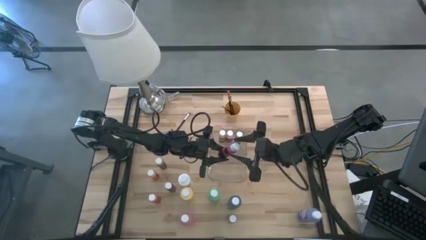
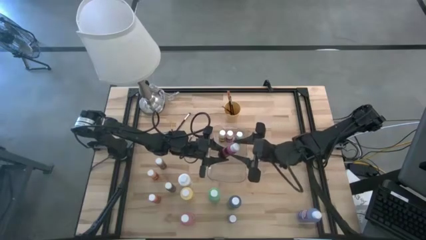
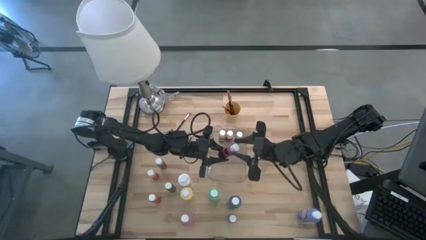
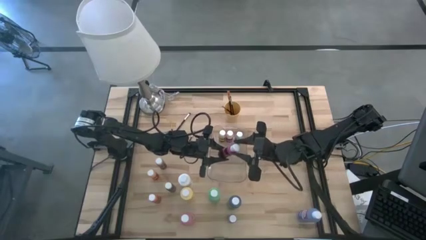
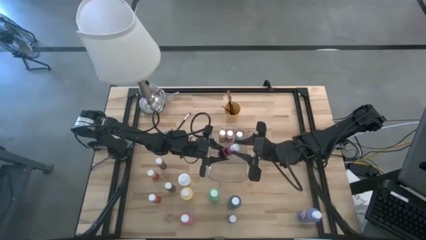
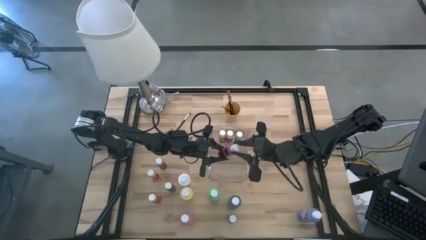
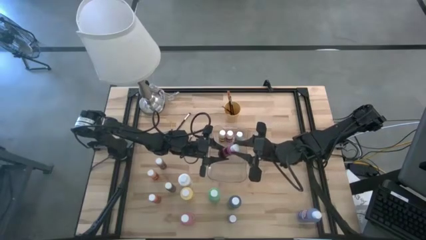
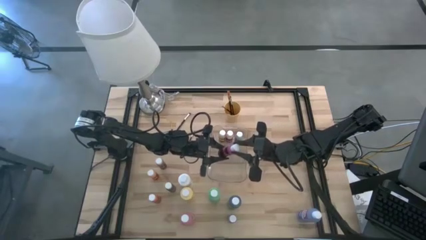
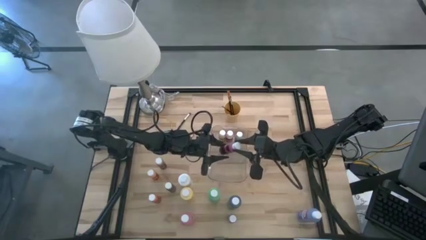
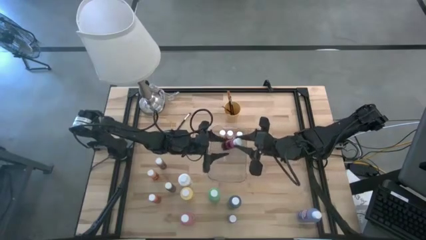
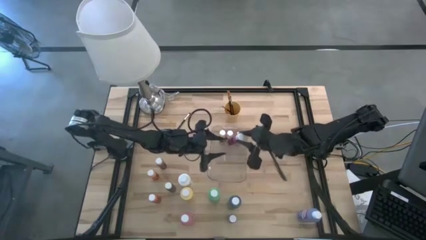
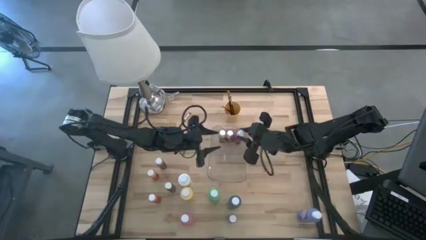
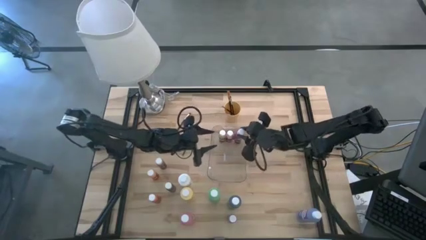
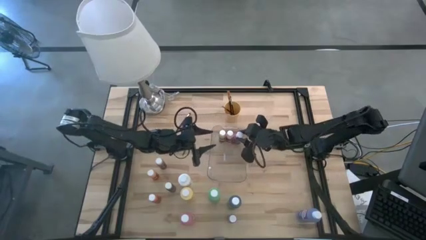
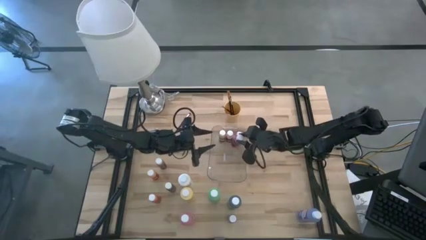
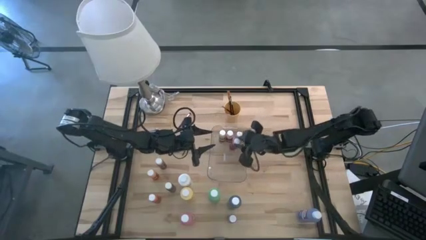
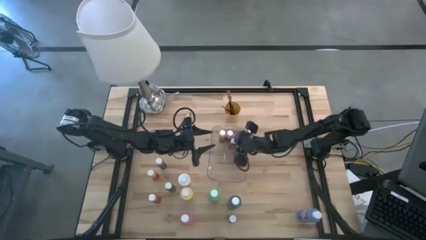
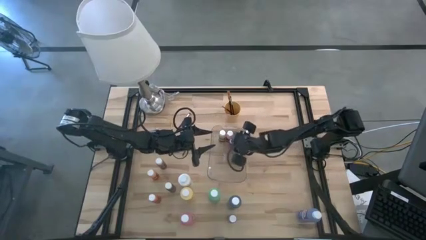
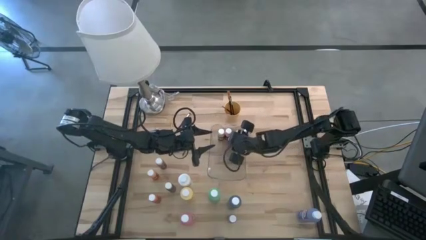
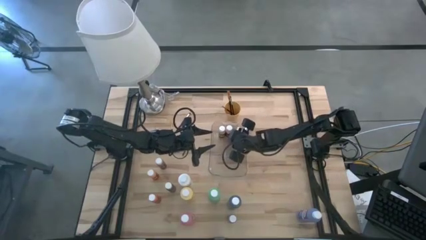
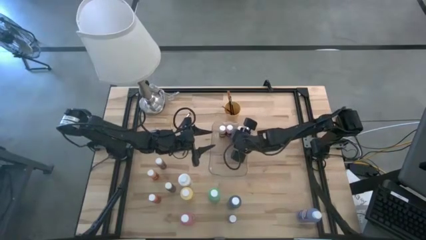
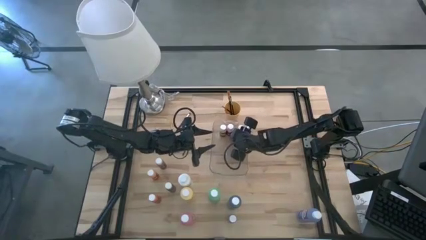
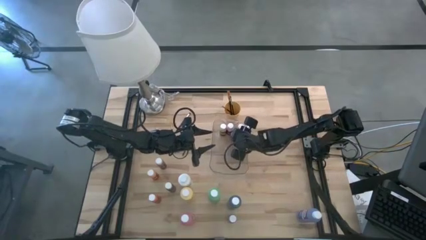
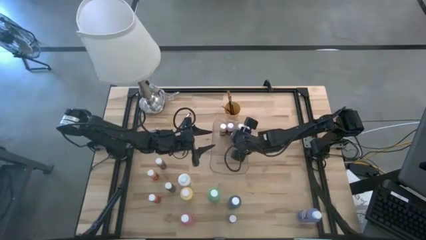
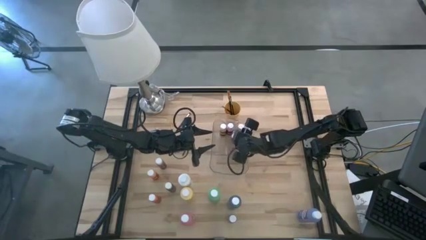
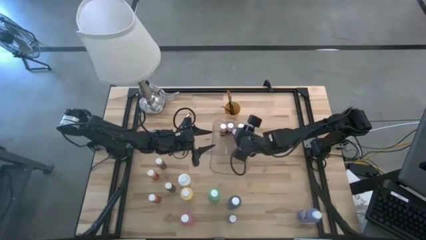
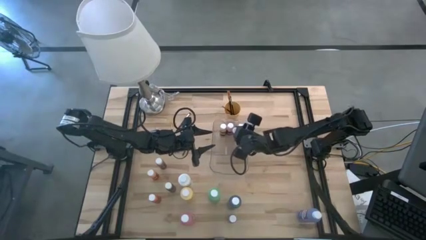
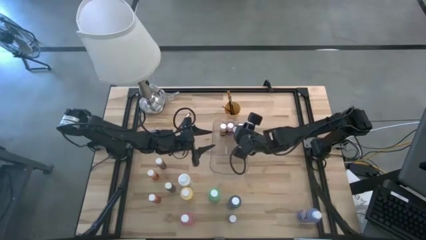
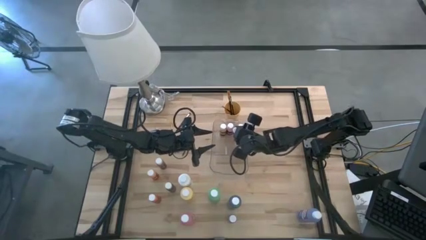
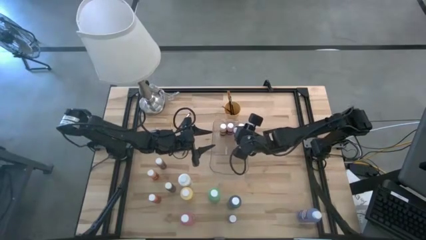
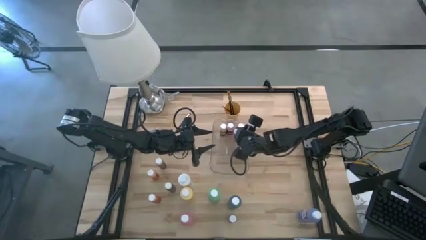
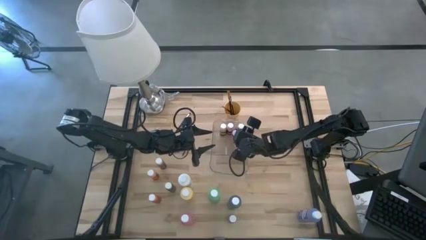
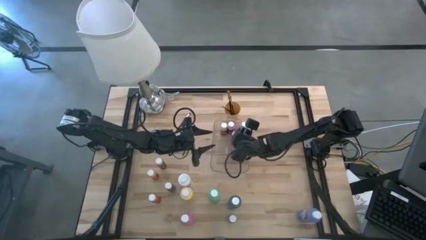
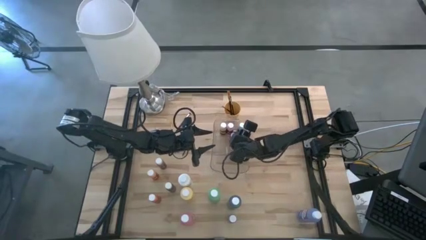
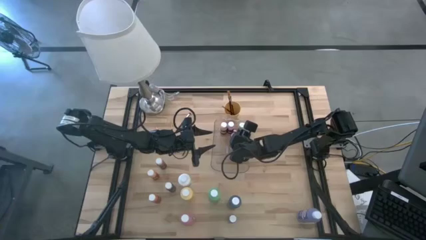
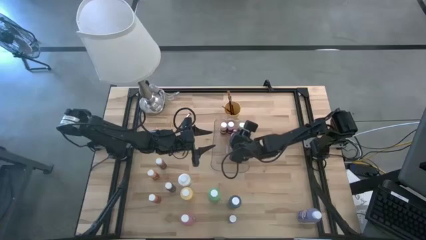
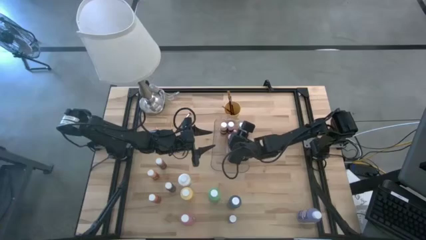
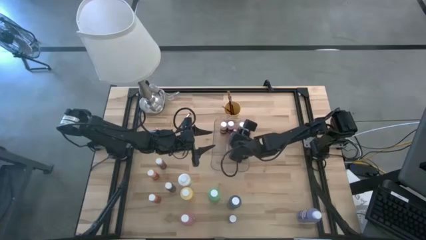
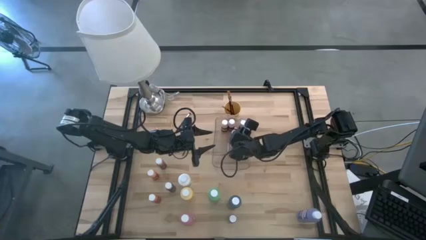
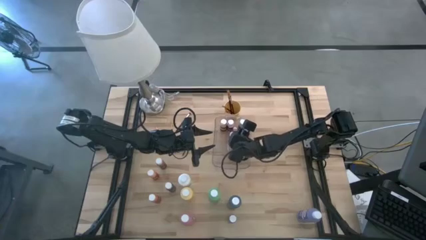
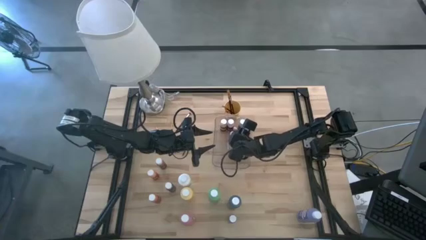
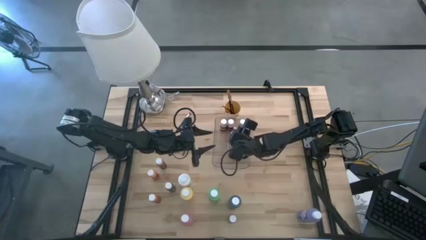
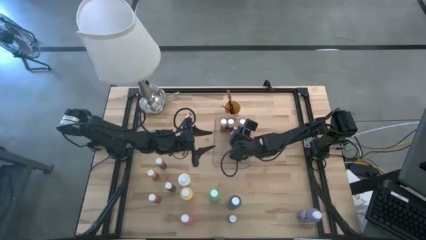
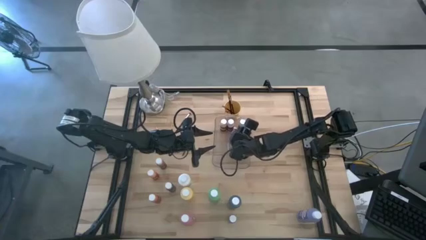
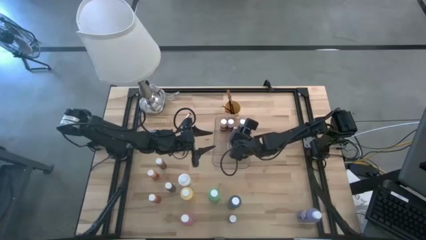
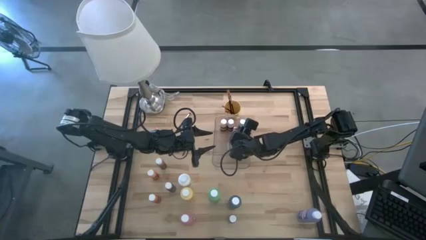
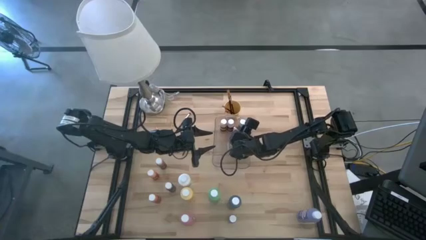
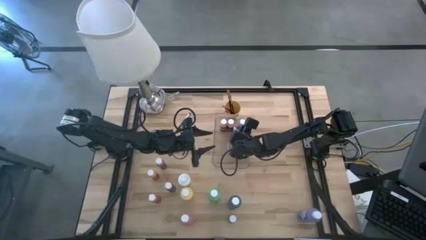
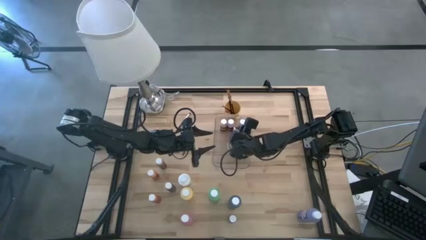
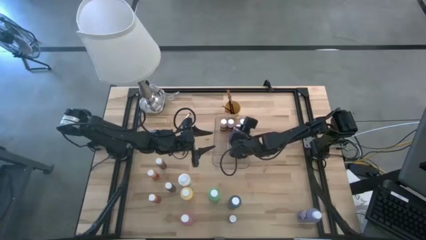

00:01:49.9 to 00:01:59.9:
Task: Pick & Place Paint Supplies
Put the small purple paint bottle into the transparent bin

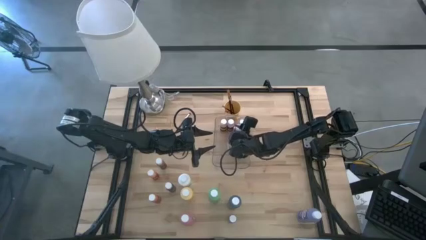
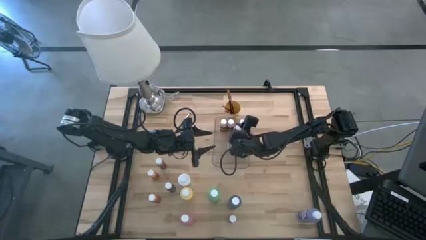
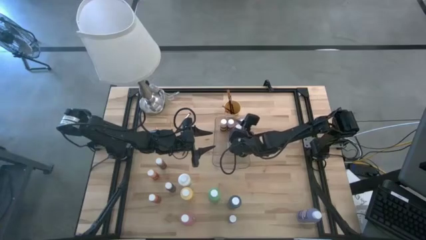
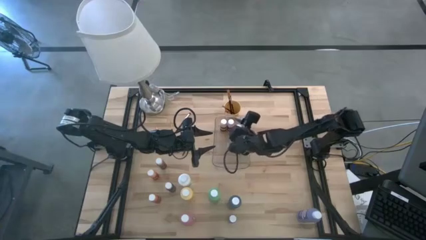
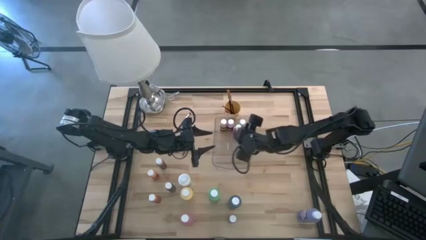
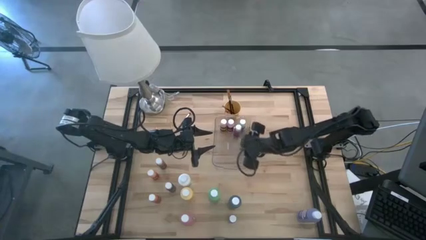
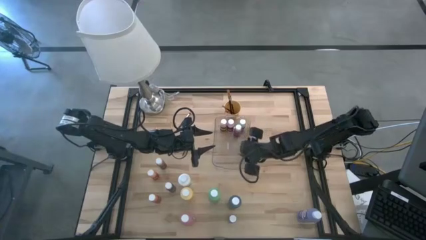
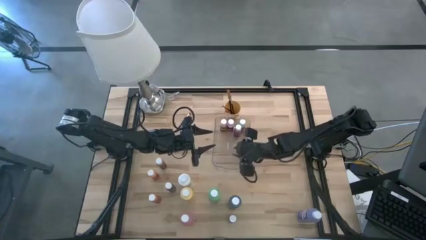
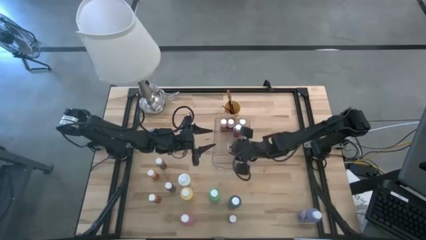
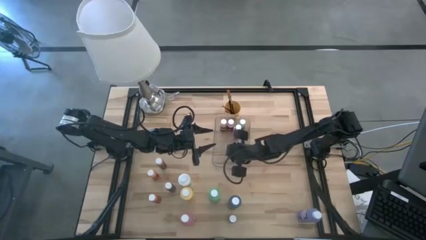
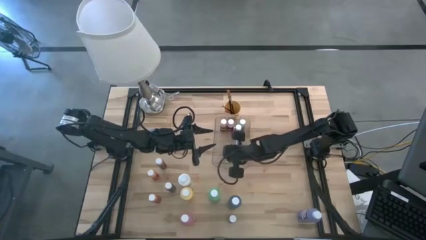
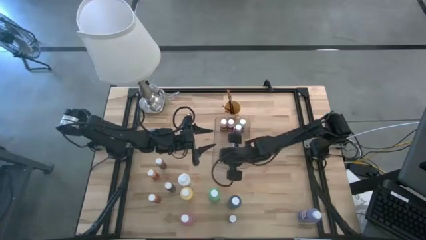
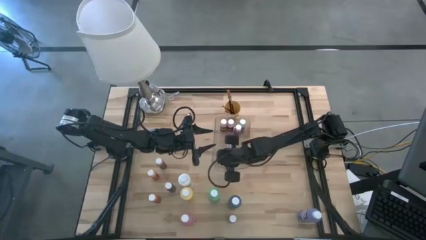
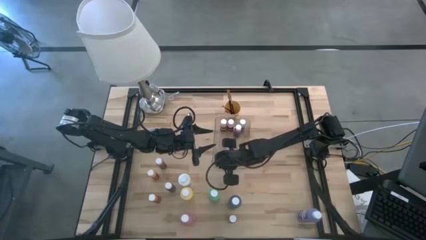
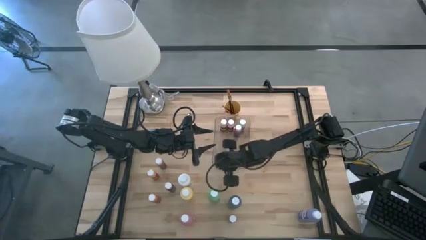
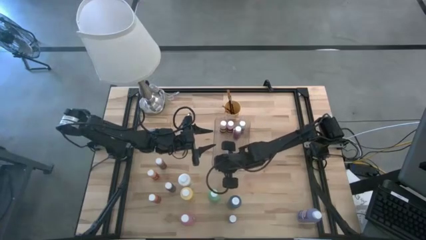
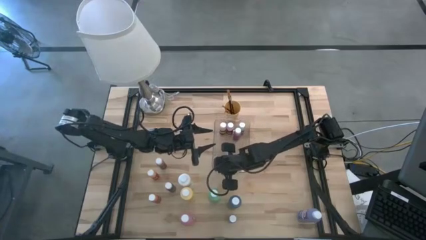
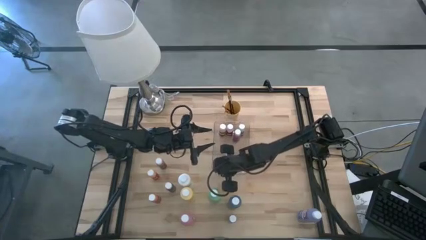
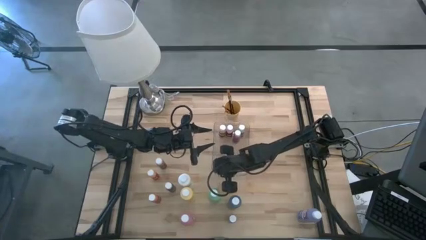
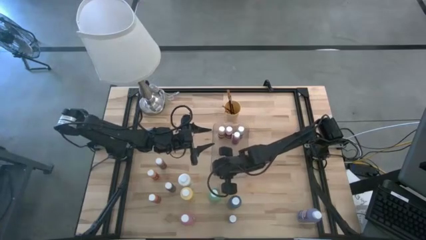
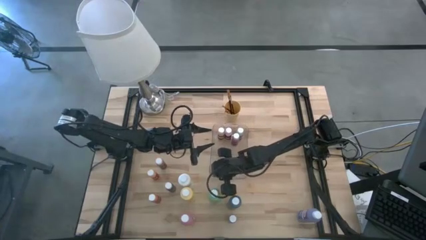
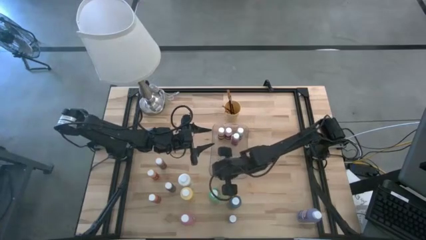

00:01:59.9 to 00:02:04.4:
Adjust the transparent bin

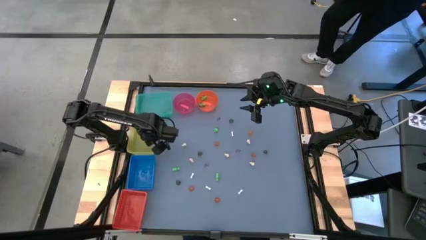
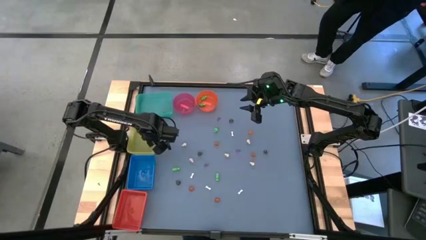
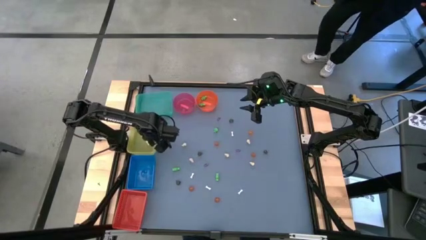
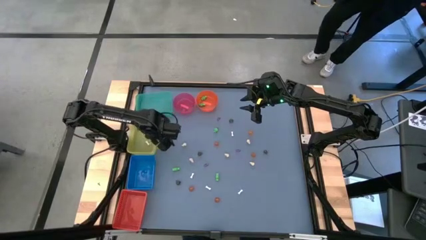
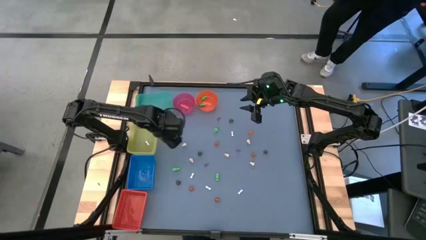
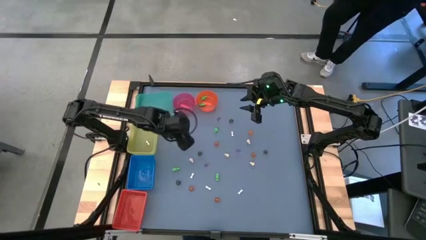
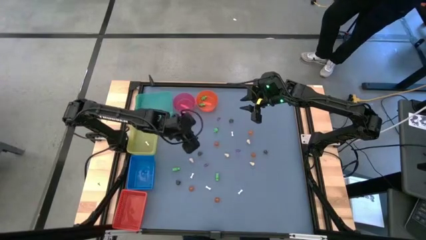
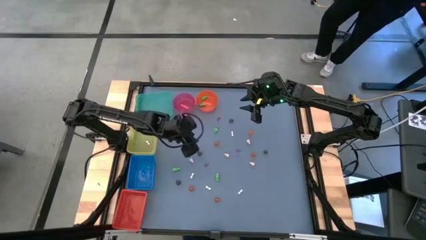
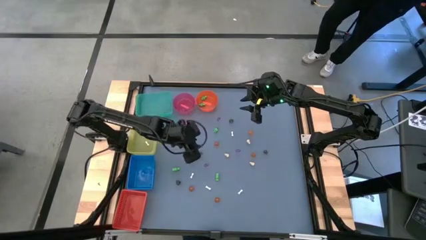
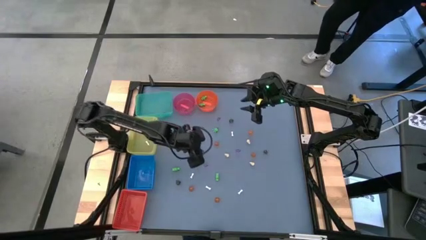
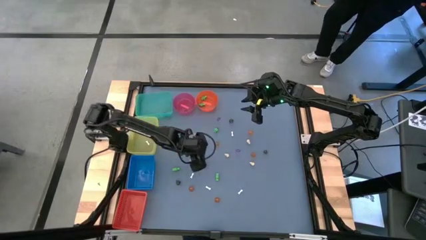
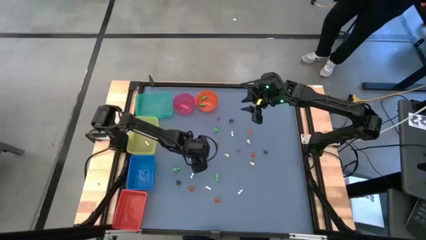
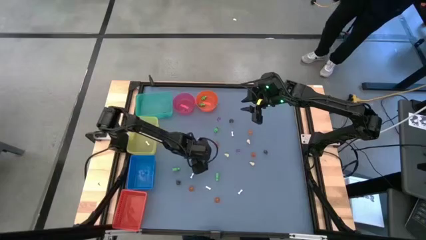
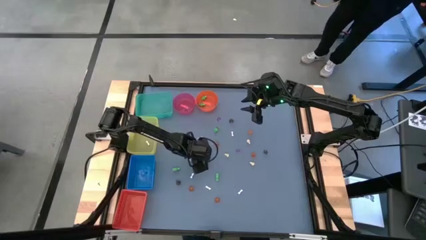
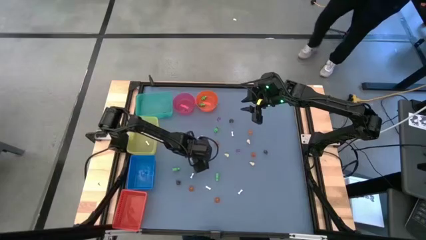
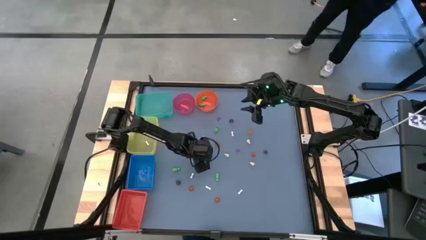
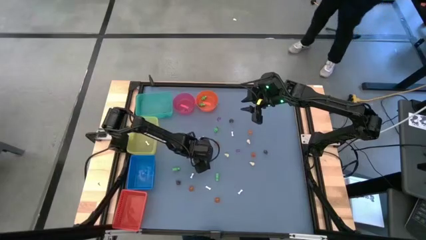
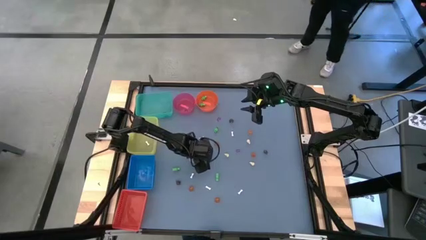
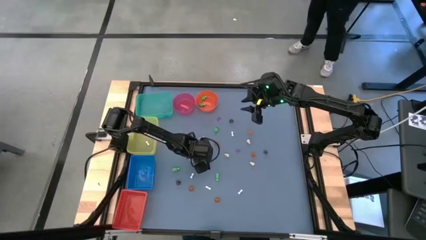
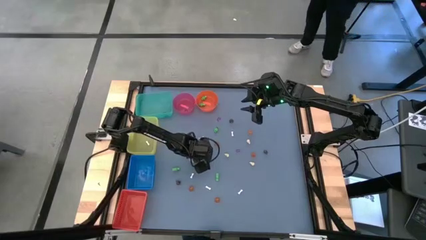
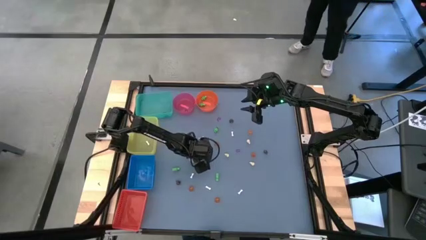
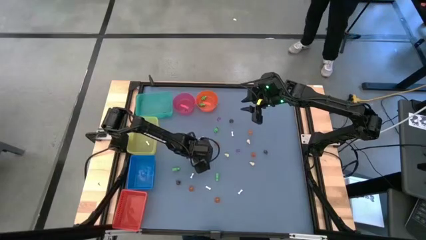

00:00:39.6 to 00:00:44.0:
Task: Sort Halloween decoration
Put the black skull toy into the green bin
